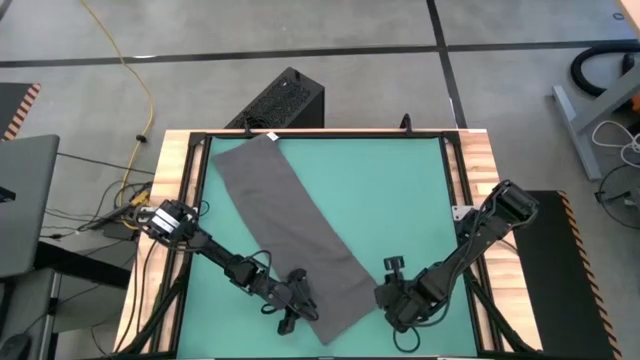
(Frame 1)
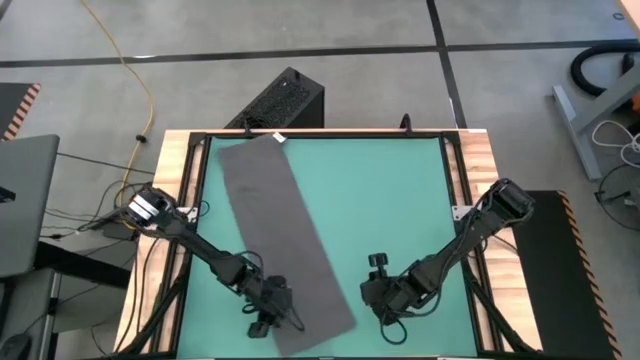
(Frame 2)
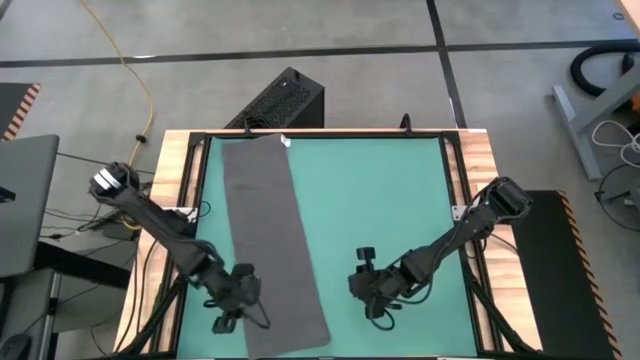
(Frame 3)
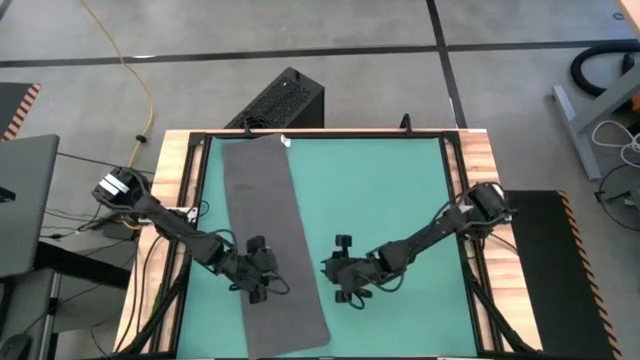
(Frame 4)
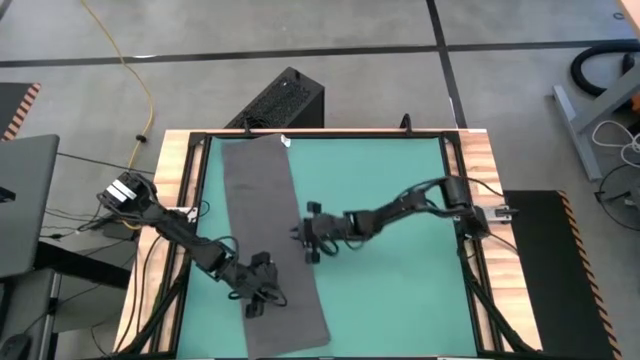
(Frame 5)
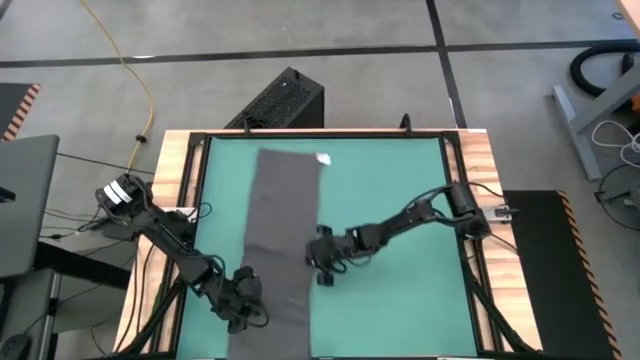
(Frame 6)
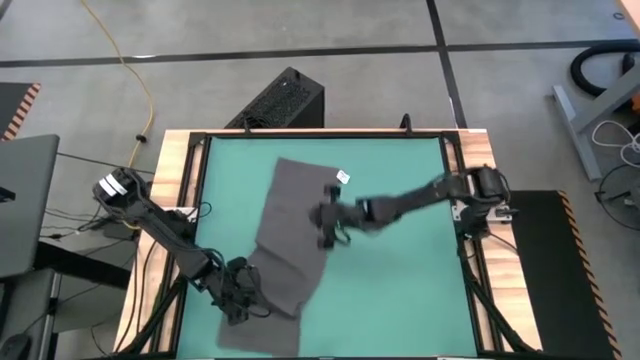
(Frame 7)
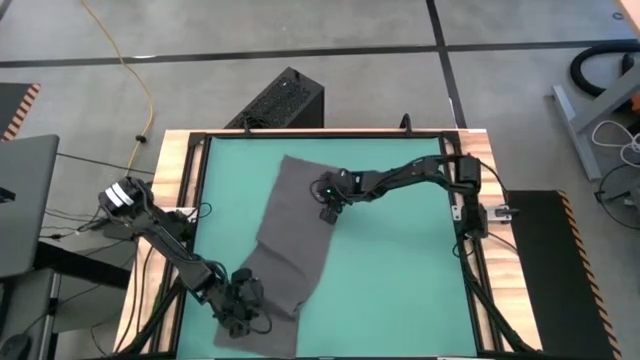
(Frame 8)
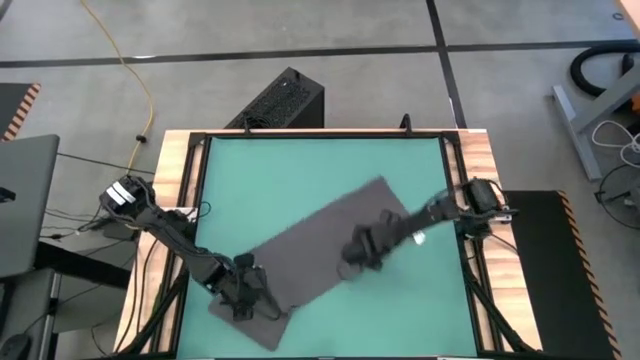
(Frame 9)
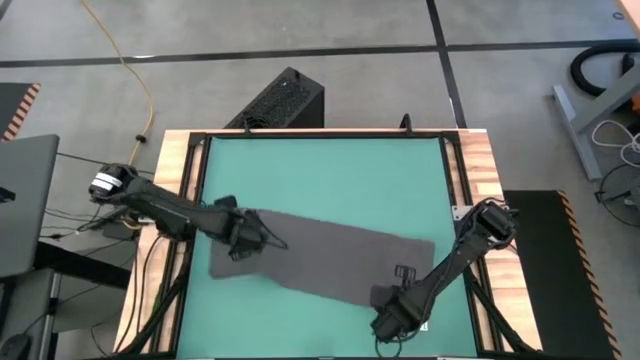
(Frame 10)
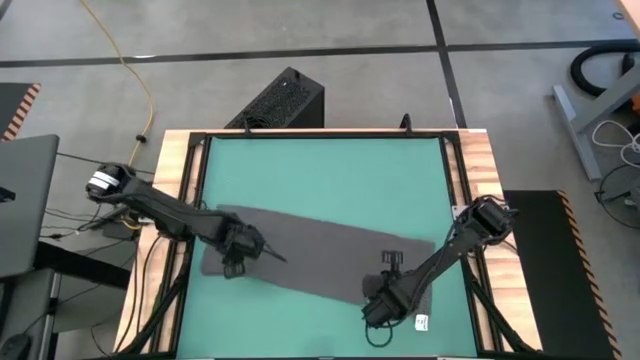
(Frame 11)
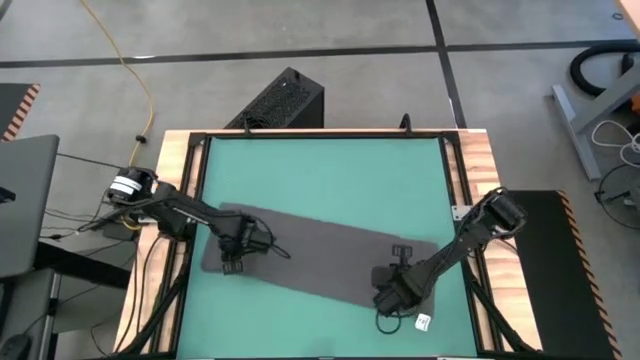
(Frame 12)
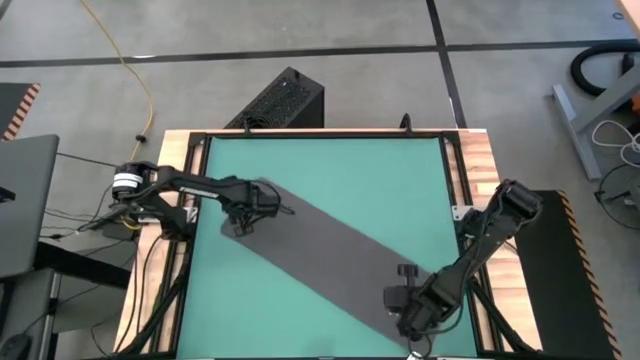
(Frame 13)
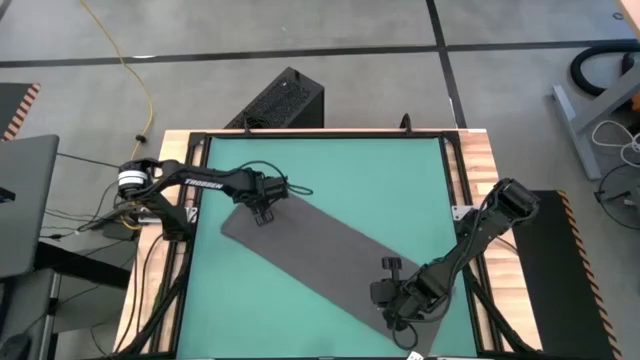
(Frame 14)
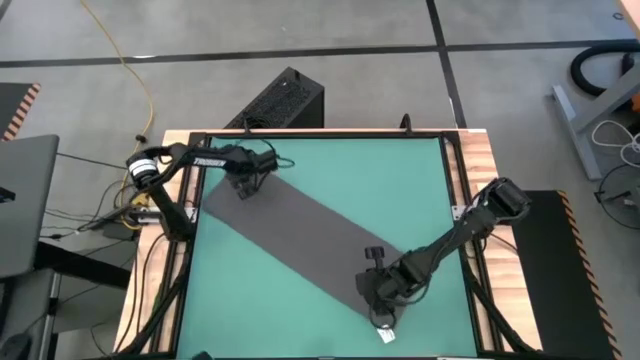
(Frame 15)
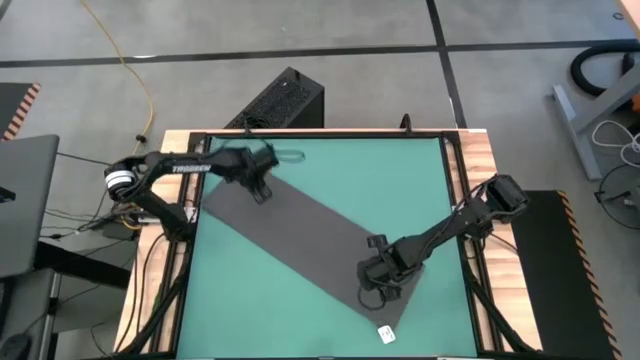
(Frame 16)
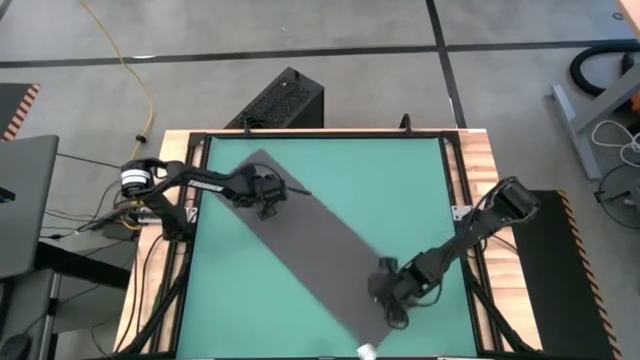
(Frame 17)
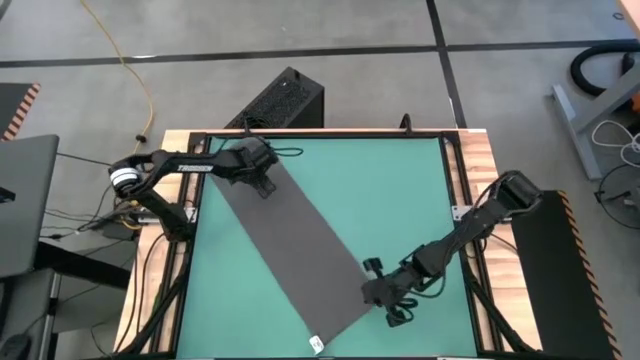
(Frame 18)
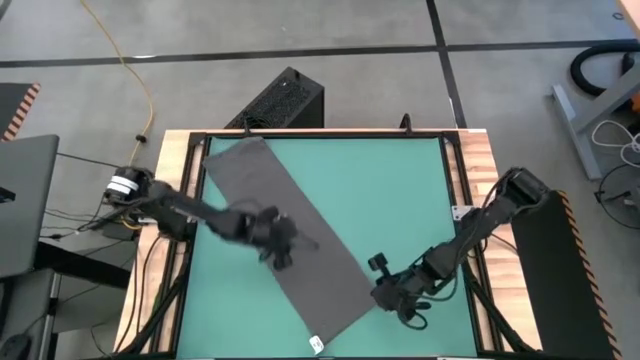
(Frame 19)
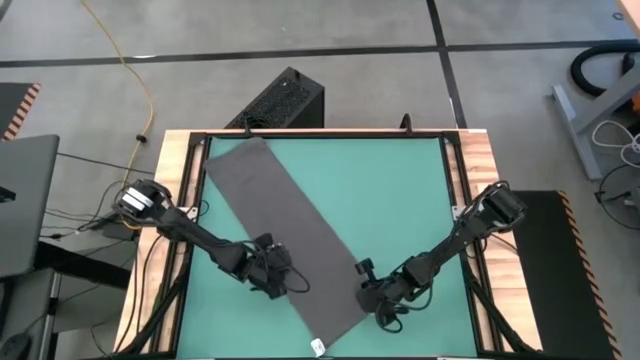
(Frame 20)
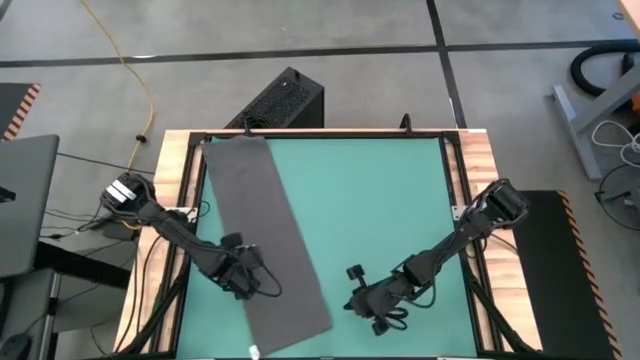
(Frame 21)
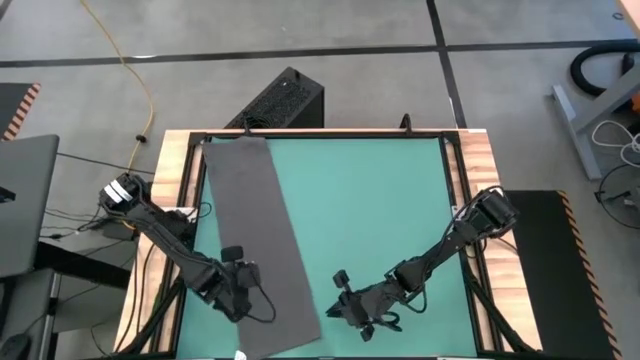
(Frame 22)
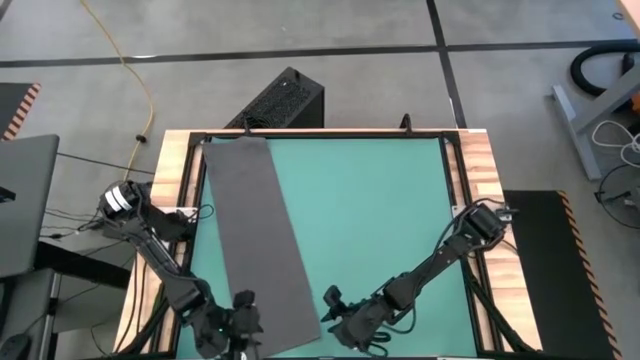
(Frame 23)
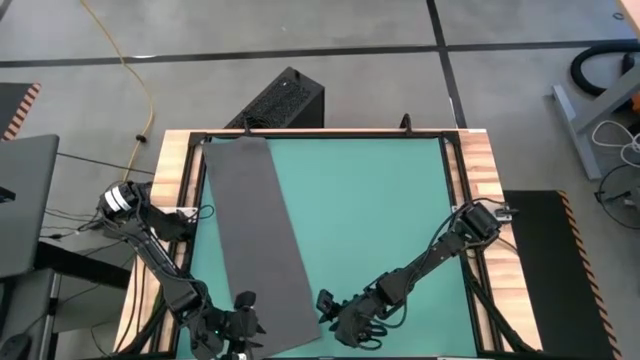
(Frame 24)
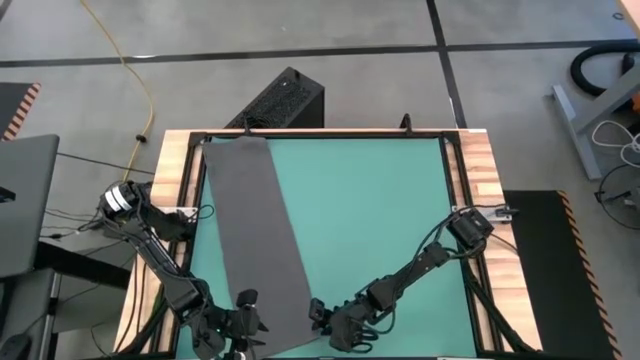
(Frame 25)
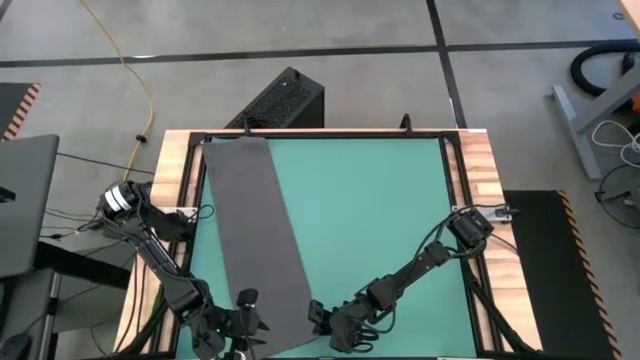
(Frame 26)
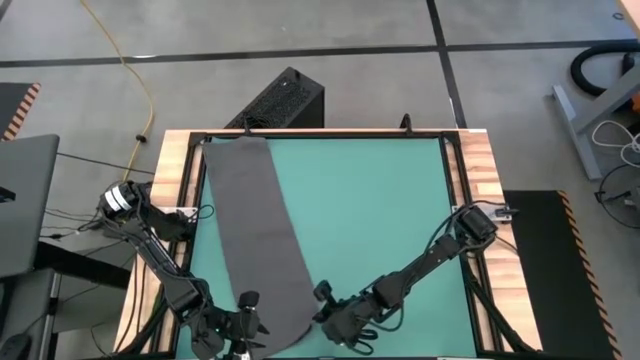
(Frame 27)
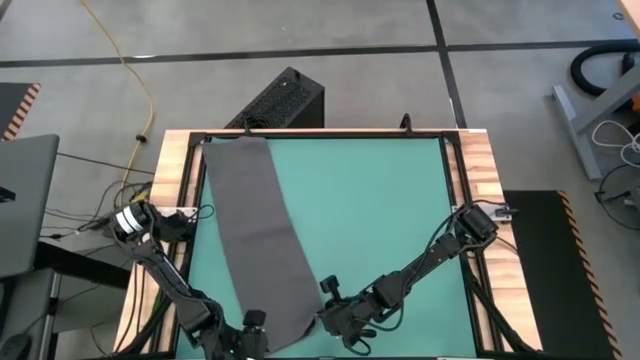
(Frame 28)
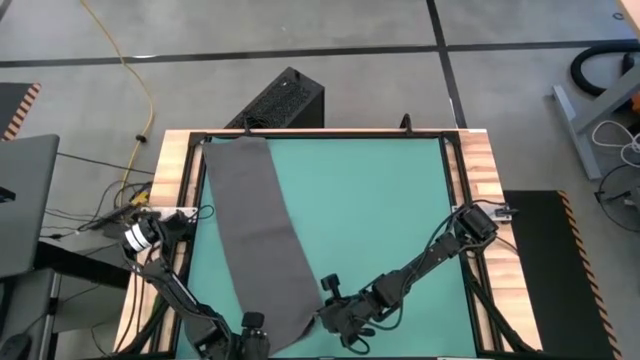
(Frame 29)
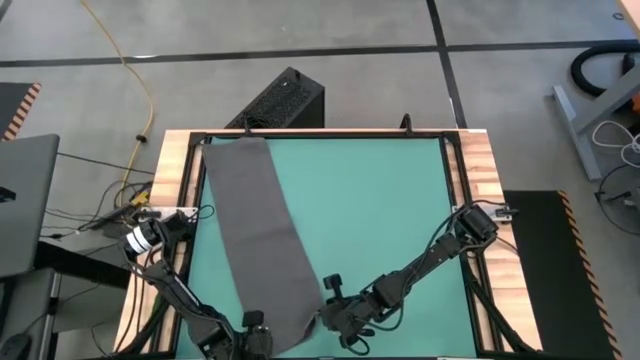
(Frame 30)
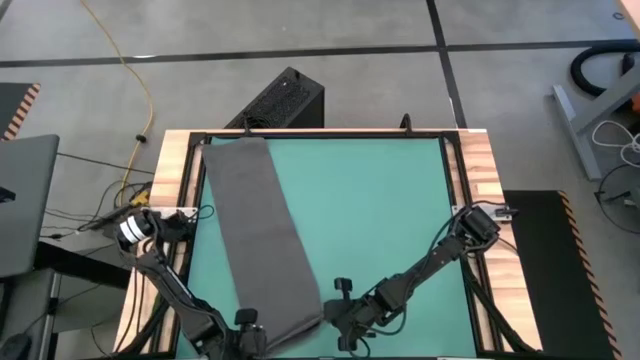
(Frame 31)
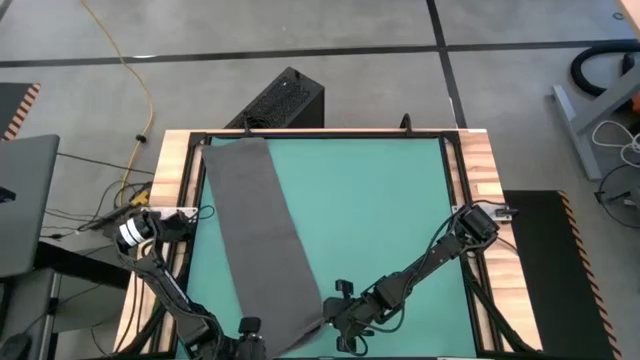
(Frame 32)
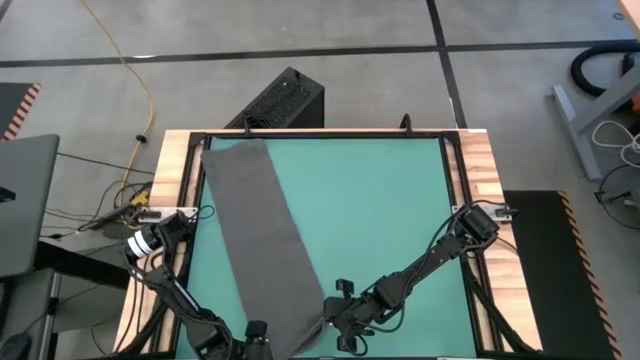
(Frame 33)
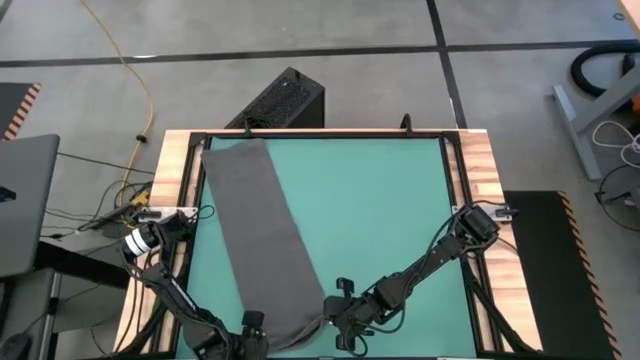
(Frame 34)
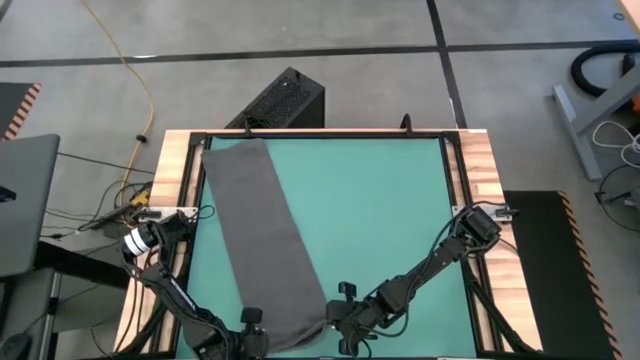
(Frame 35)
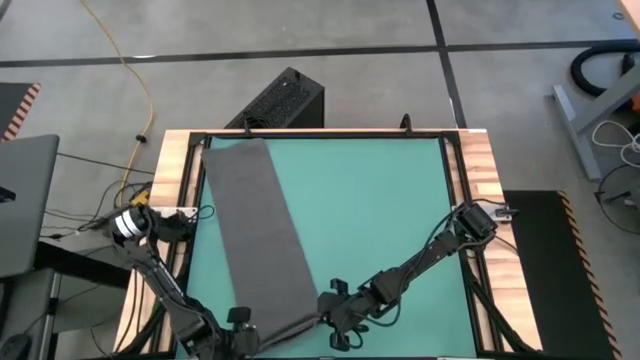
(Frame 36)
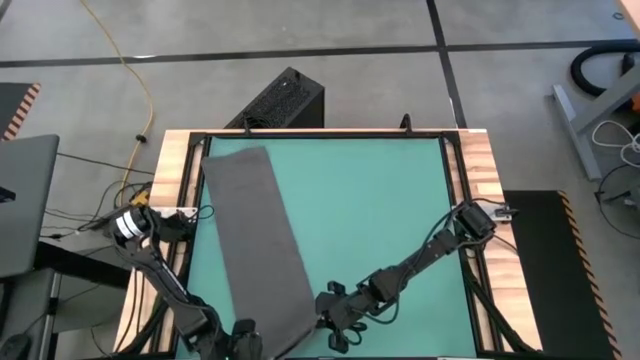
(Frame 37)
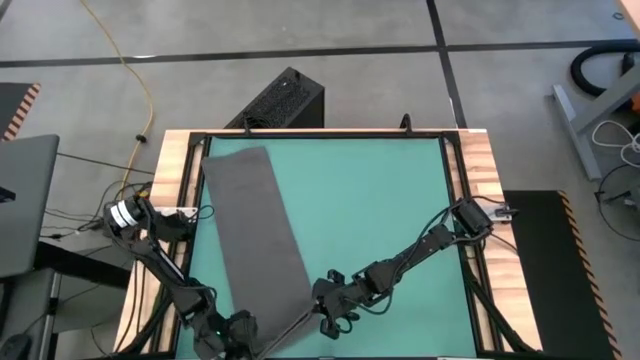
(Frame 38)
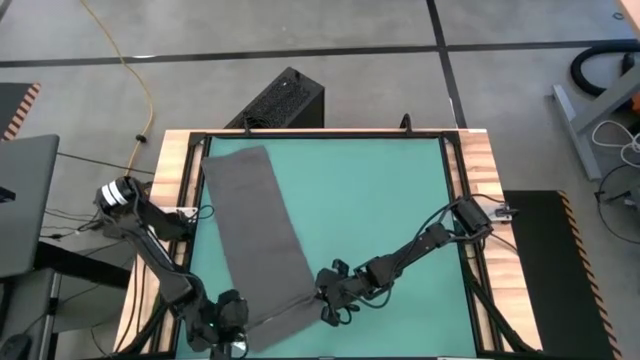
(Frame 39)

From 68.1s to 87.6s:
Task: Roll towel
Roll the gray towel

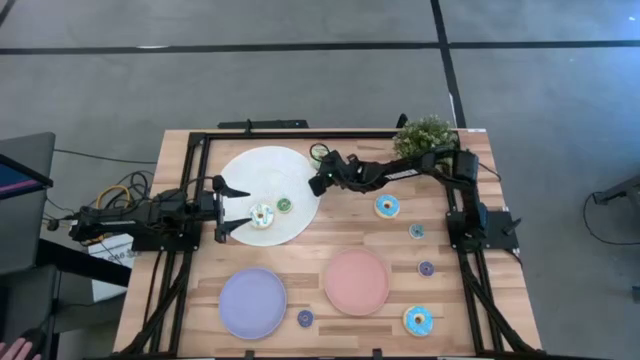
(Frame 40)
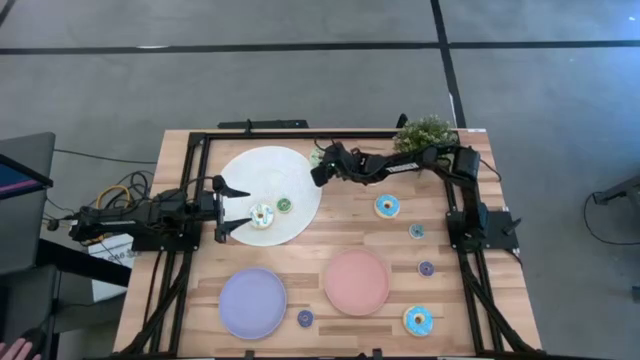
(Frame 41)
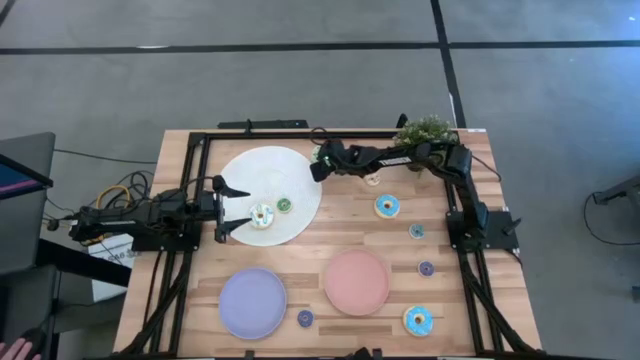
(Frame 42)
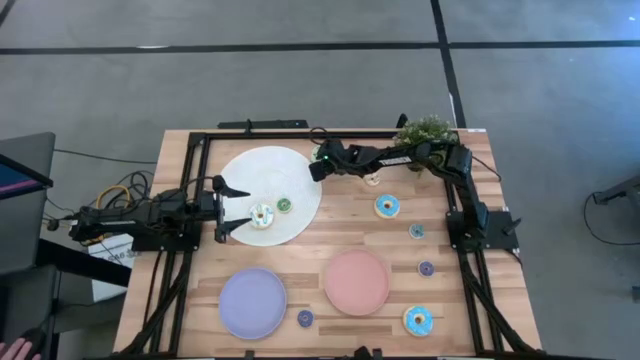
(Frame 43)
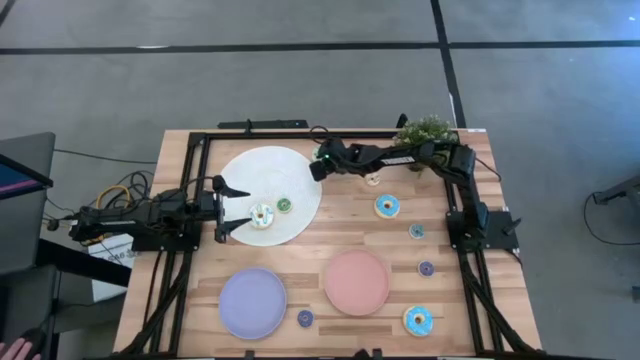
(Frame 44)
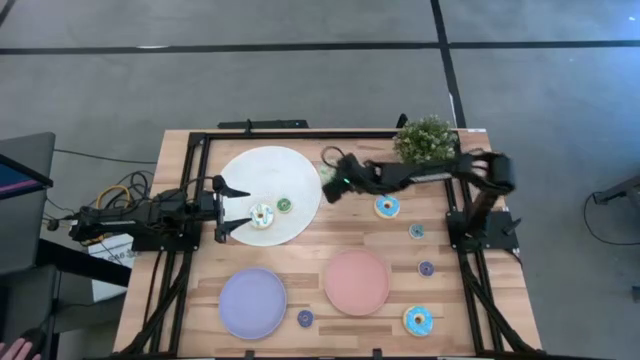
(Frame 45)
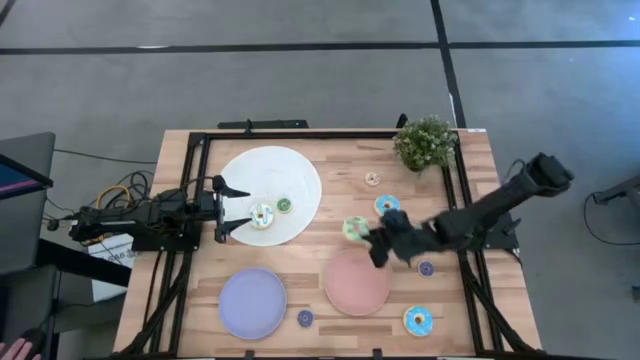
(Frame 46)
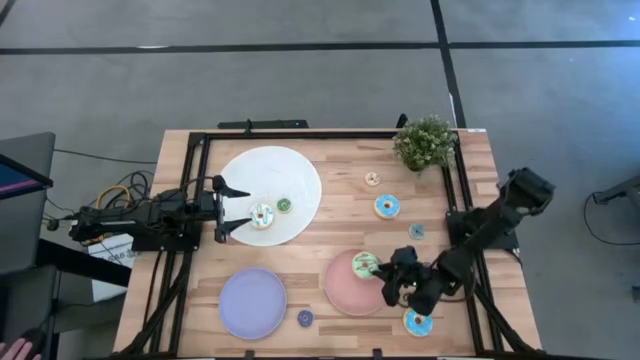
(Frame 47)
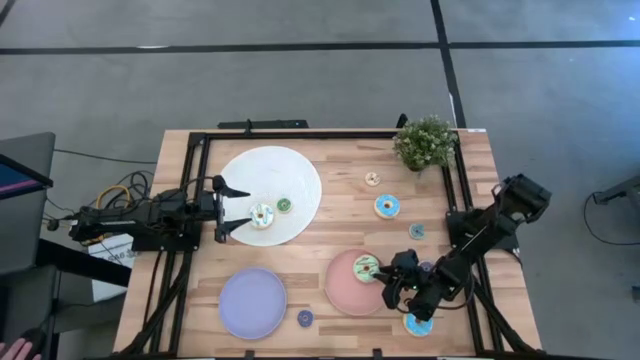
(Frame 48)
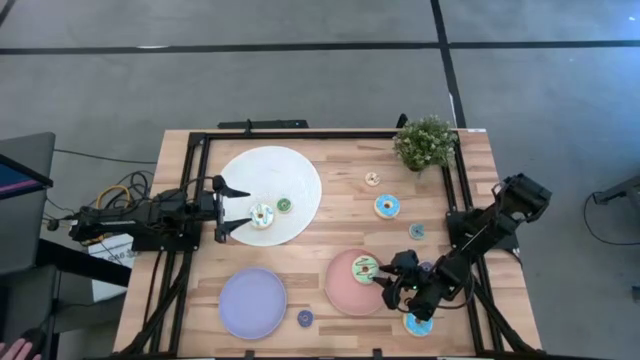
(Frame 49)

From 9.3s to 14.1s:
Task: Pick & Place donuts
Put the large green donut on the pink plate
